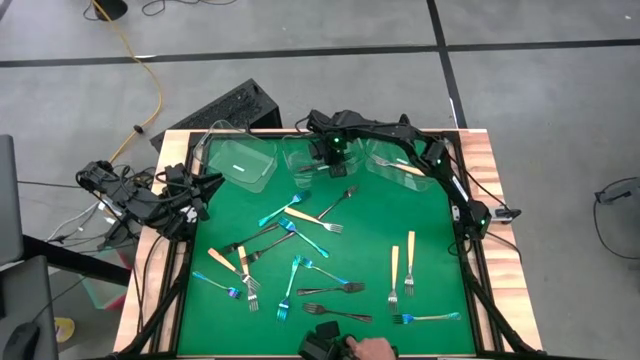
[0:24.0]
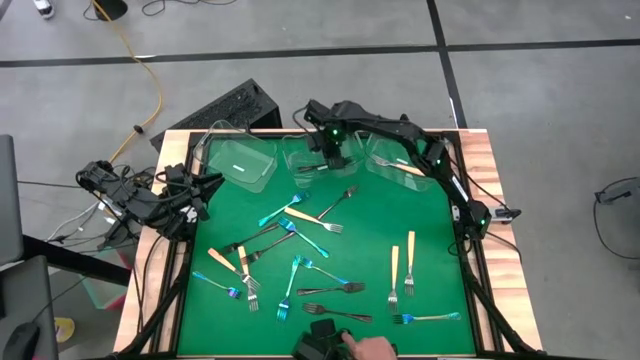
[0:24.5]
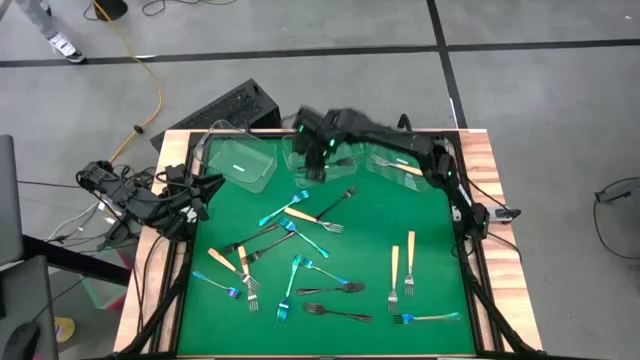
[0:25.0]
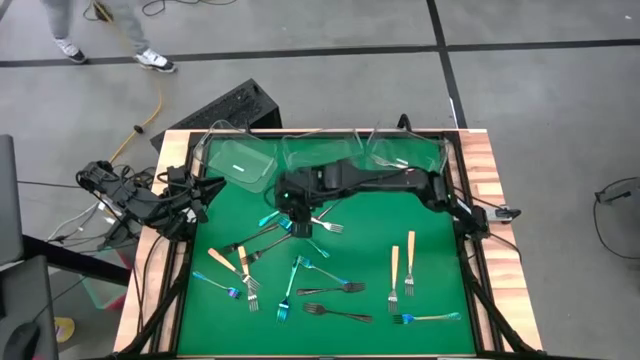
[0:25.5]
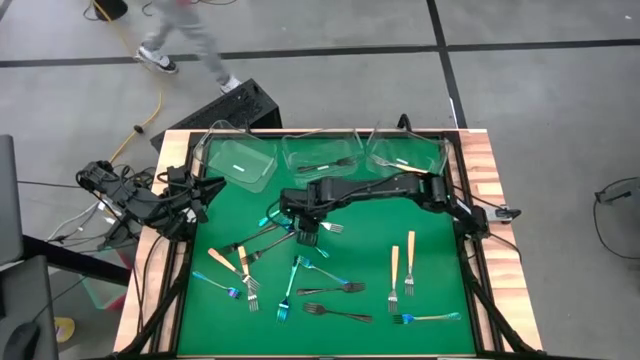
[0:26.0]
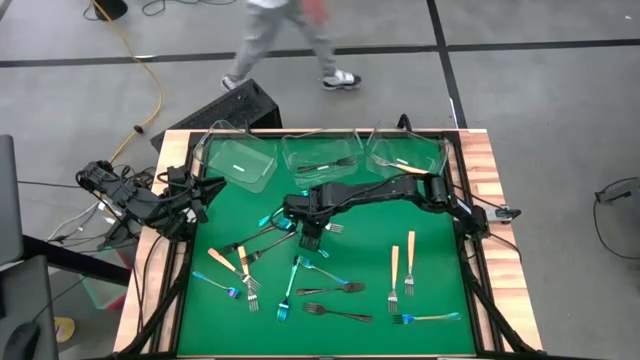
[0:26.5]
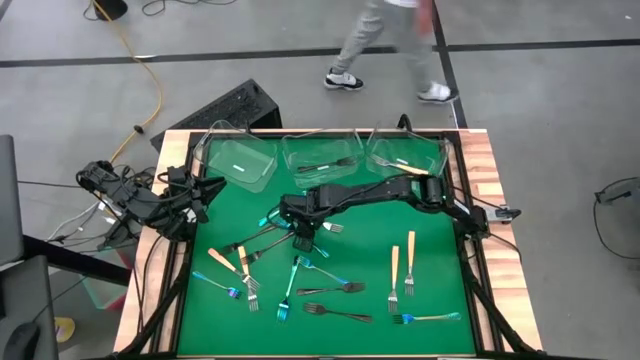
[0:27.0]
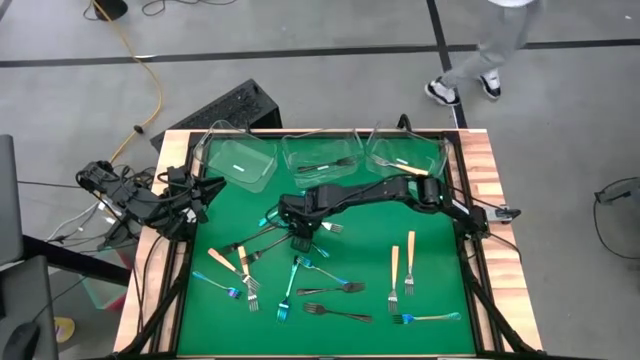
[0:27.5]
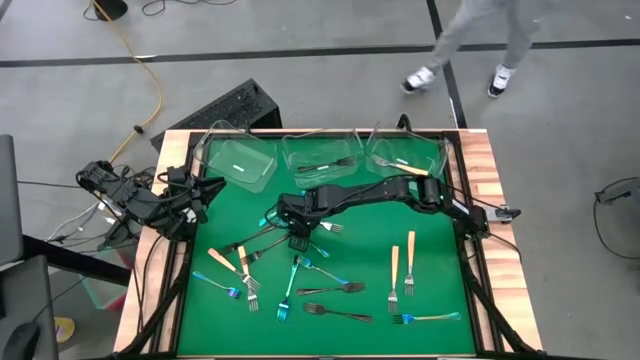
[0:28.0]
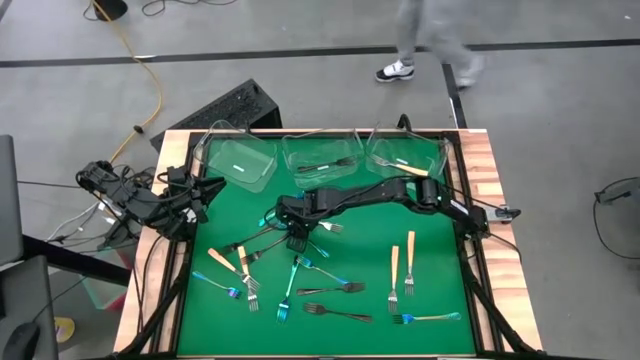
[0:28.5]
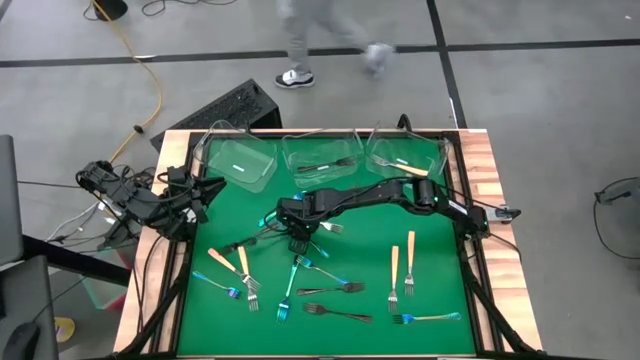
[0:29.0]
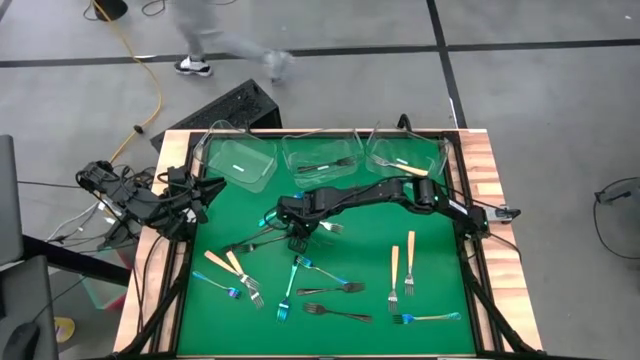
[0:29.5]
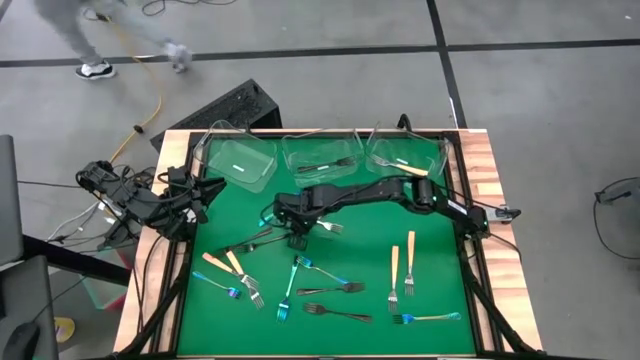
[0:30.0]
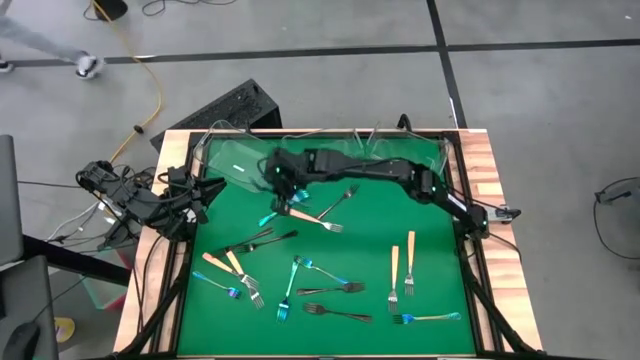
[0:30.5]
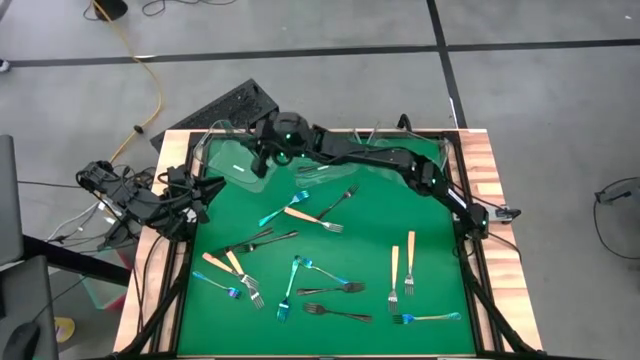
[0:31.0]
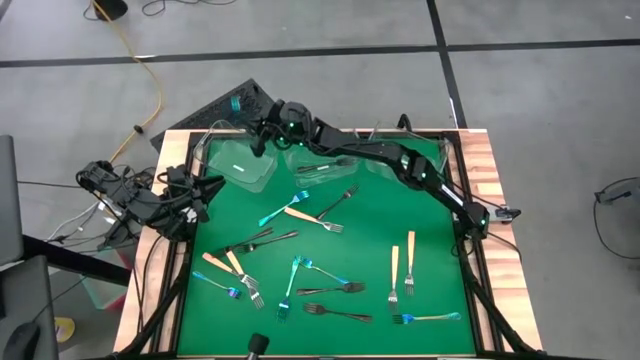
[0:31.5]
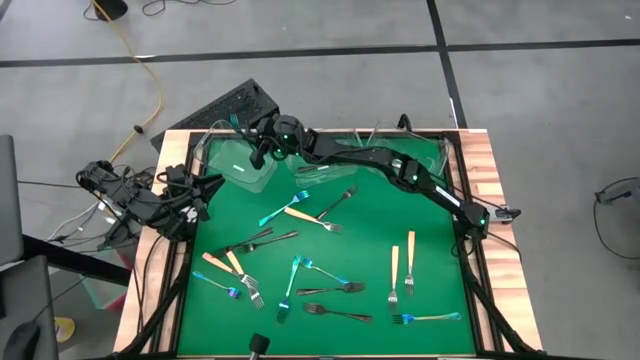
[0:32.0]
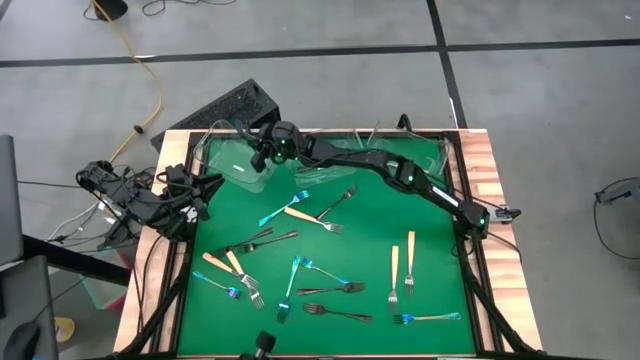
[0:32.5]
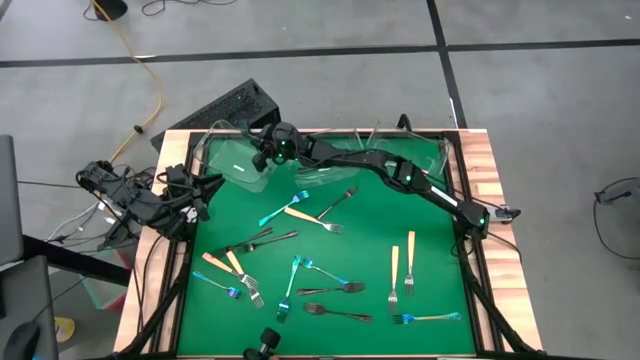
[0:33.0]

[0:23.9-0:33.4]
Task: Sort silverware by color (type)
Put the blue fork into the left transparent bin

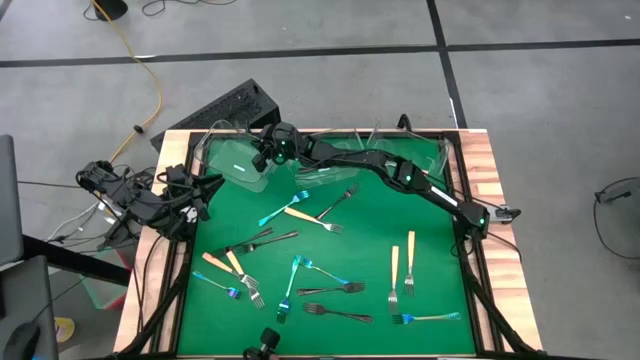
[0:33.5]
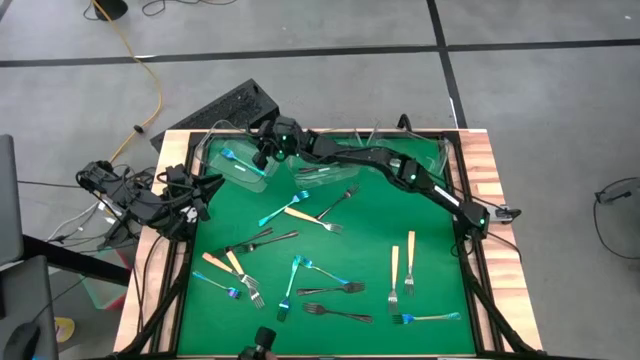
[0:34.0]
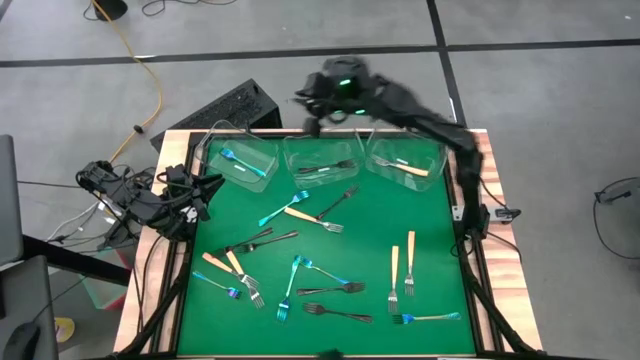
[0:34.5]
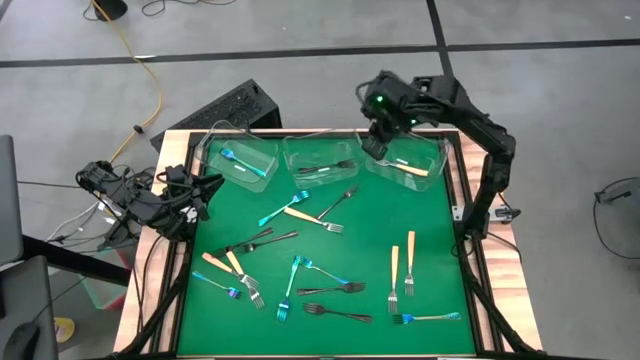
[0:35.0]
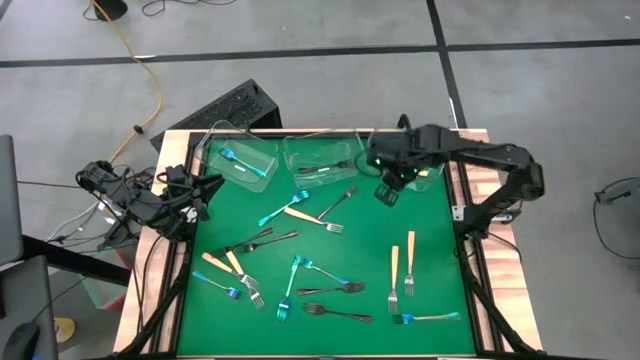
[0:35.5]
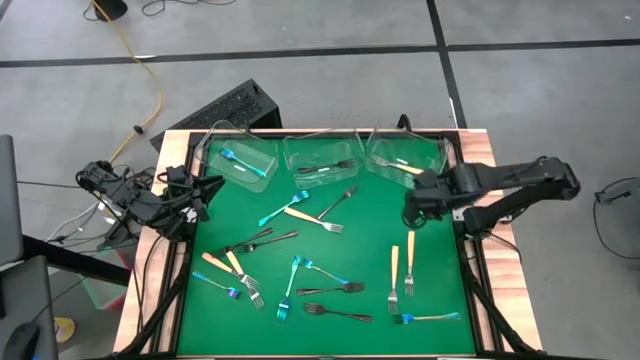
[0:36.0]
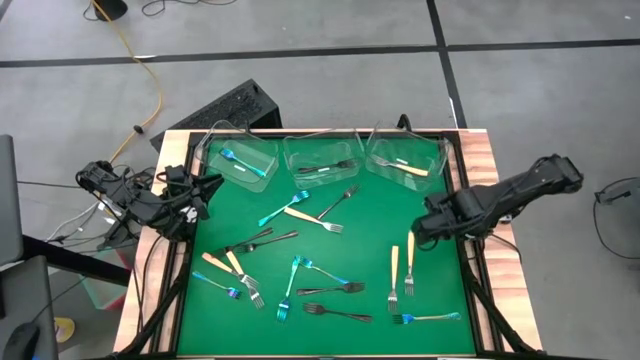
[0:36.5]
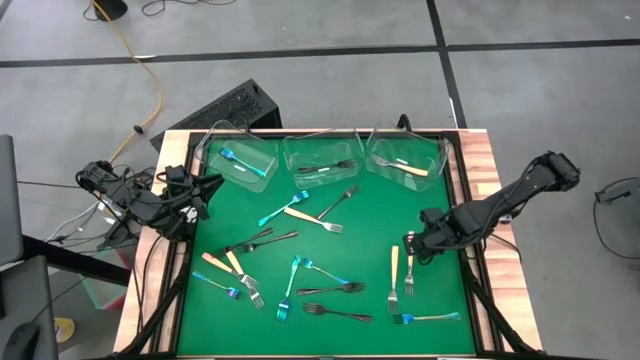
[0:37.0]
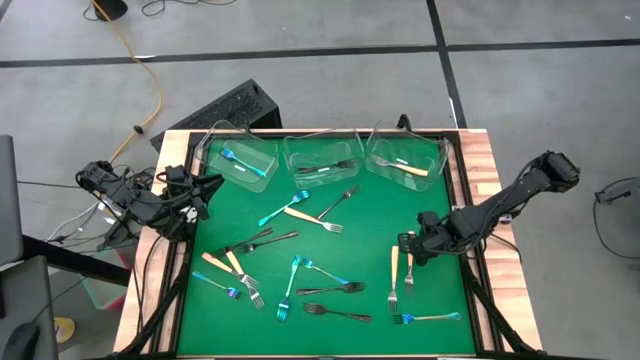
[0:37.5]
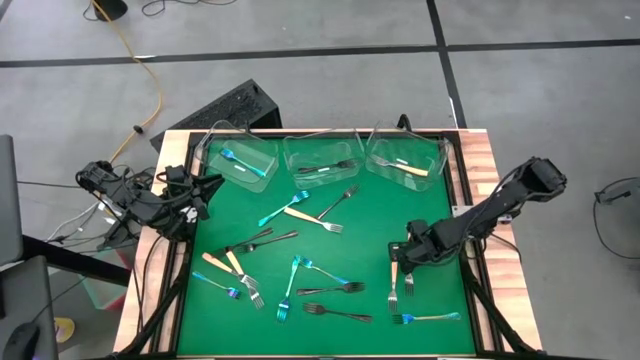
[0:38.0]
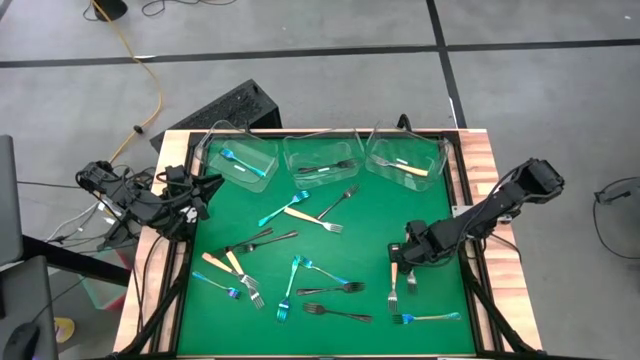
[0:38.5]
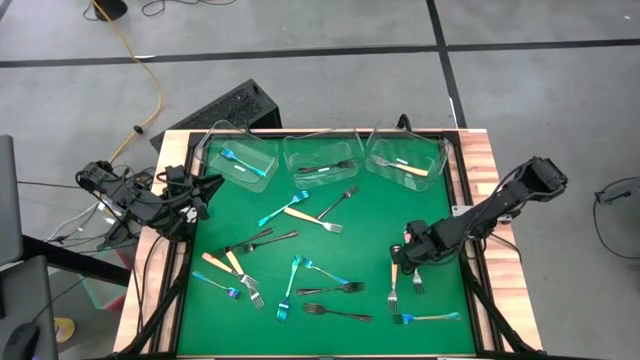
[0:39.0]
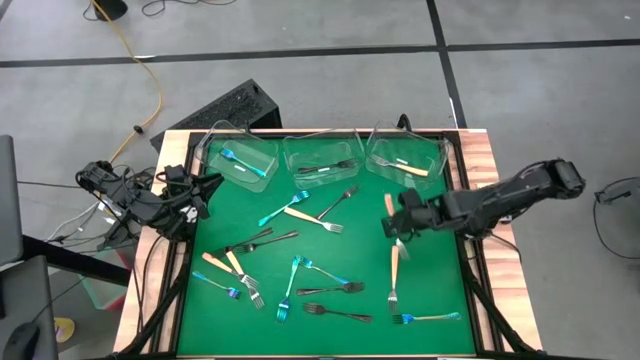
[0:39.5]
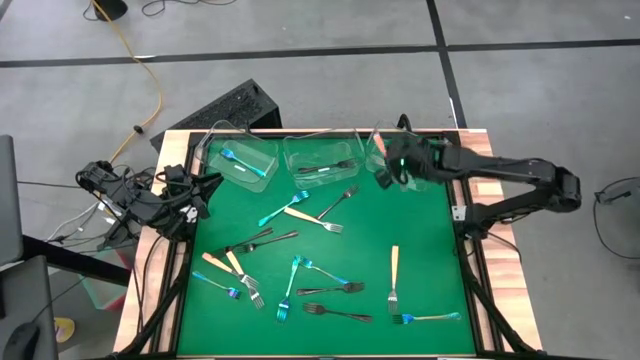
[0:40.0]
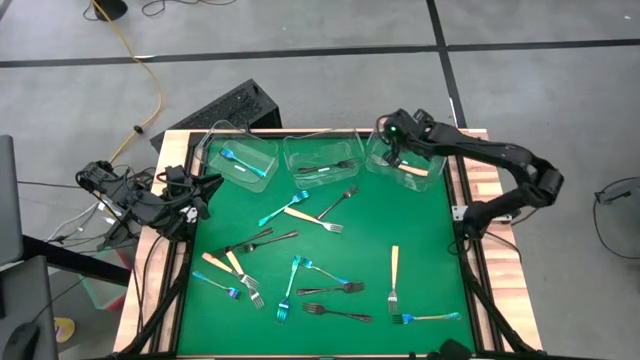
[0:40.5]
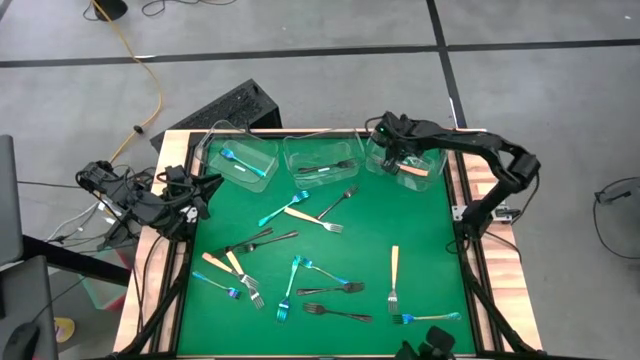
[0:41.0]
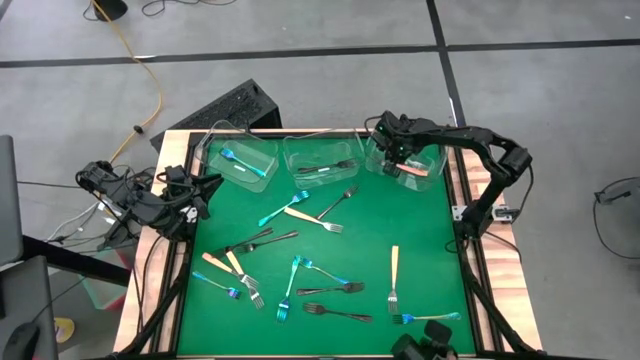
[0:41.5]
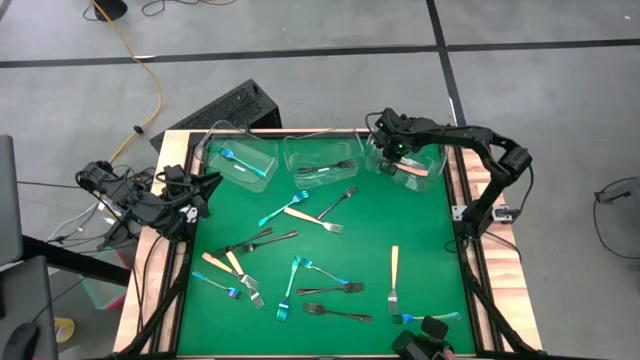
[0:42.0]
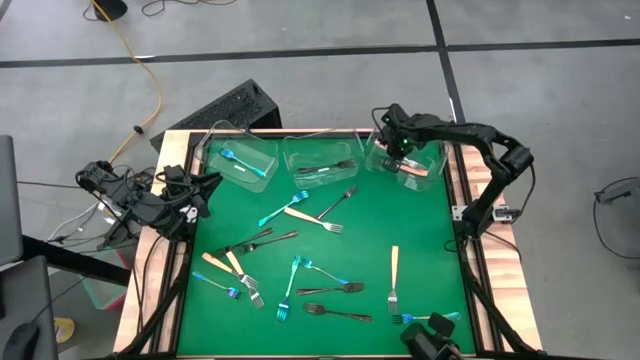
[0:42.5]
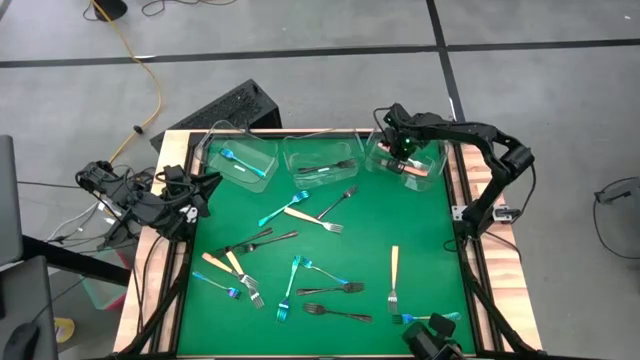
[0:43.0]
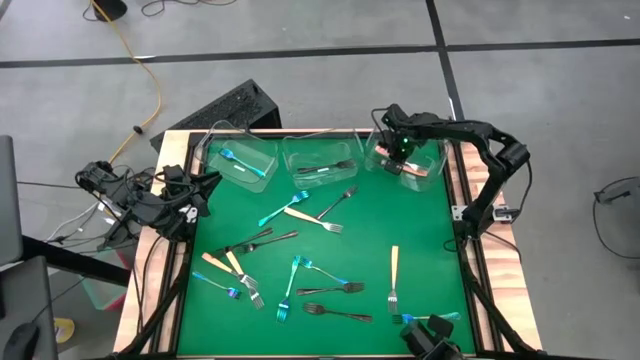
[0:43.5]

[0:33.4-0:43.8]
Put the yellow fork into the right transparent bin

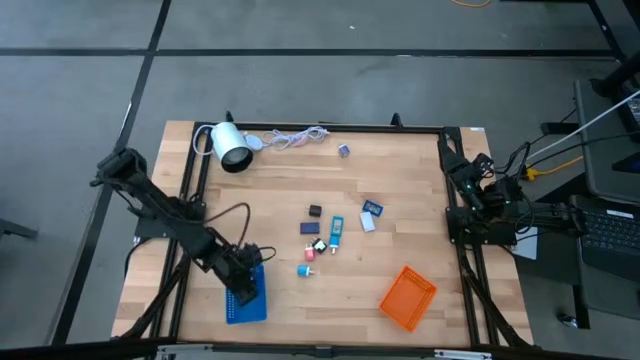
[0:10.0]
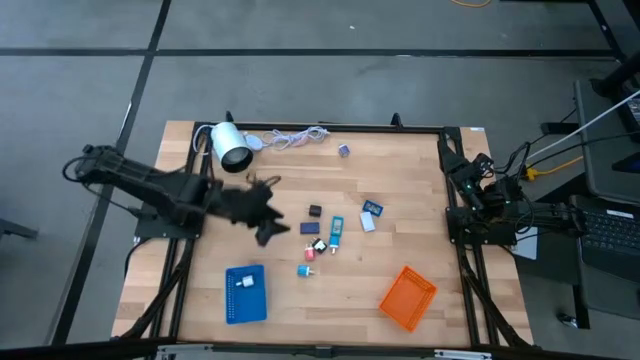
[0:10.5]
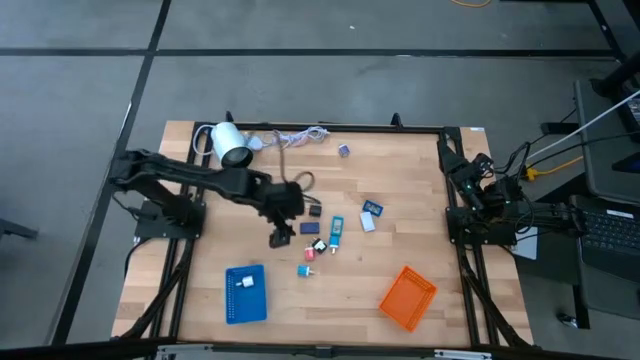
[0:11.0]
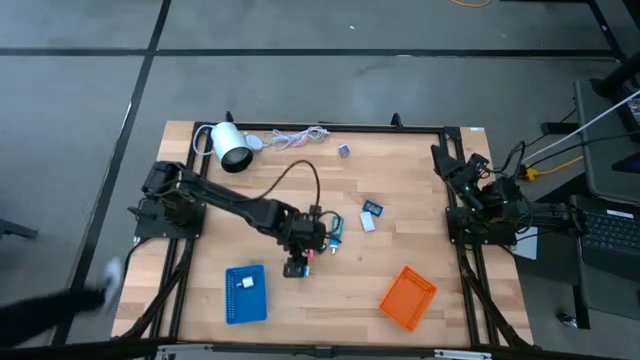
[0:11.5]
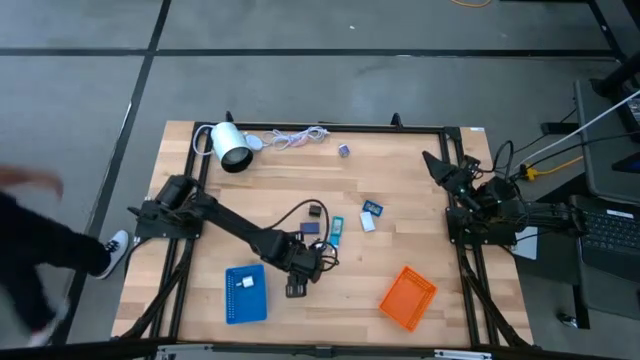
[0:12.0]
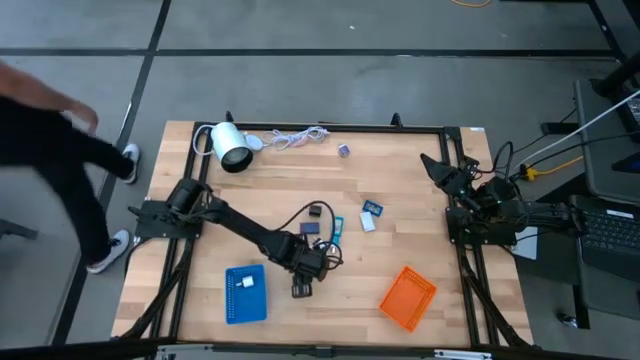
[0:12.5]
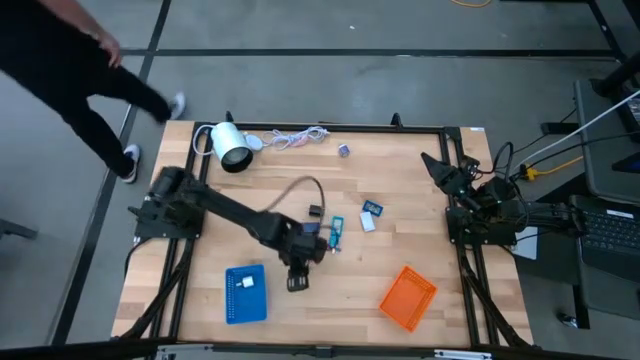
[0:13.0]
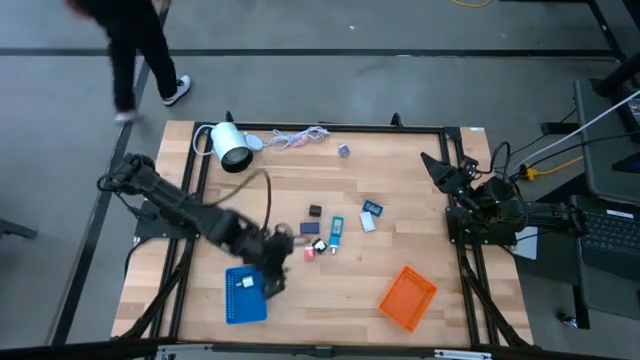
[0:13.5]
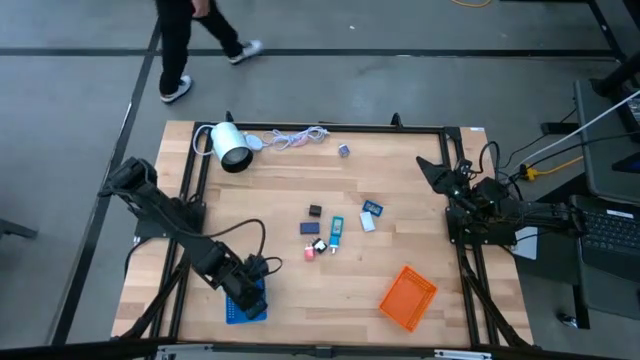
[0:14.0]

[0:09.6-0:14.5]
Task: Pick & Place Office items
Put the bottom blue charger adapter into the blue basket
